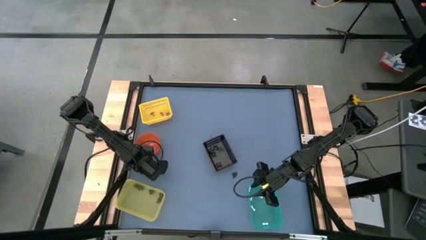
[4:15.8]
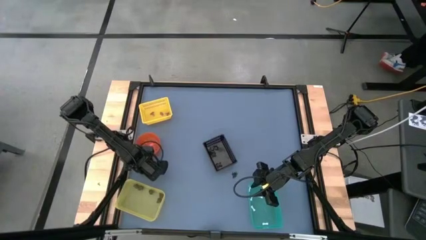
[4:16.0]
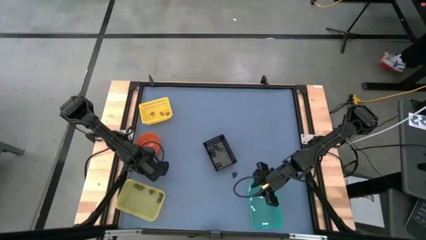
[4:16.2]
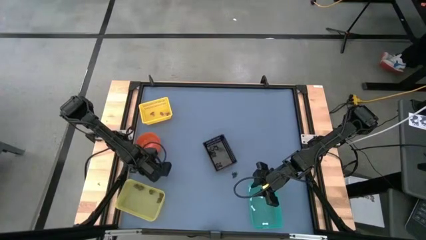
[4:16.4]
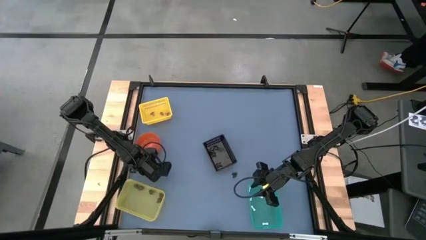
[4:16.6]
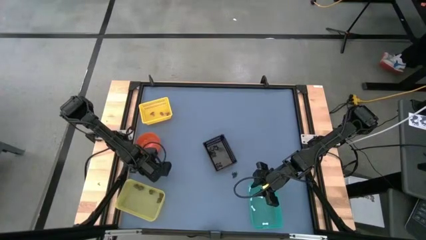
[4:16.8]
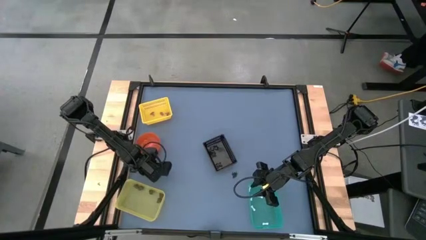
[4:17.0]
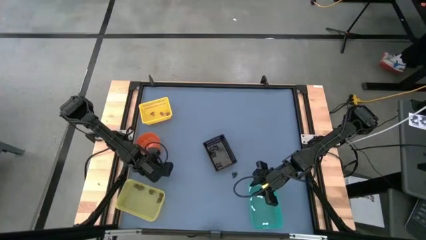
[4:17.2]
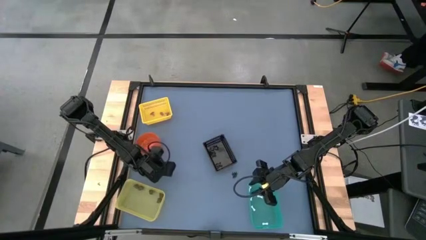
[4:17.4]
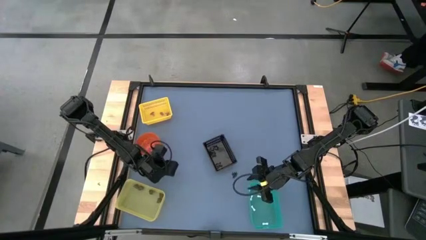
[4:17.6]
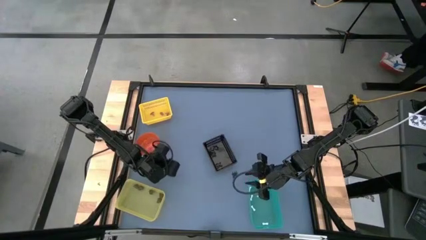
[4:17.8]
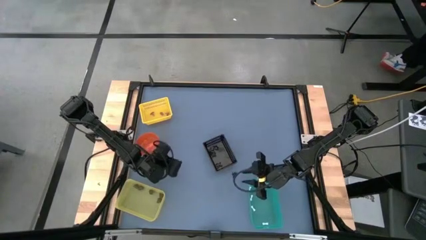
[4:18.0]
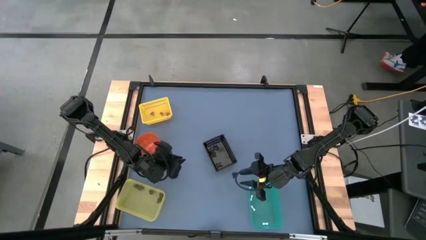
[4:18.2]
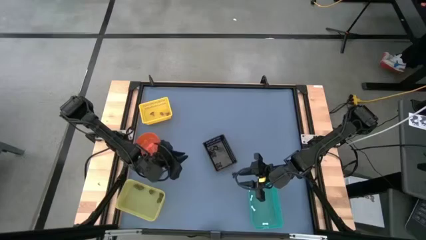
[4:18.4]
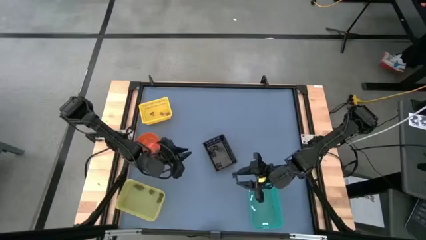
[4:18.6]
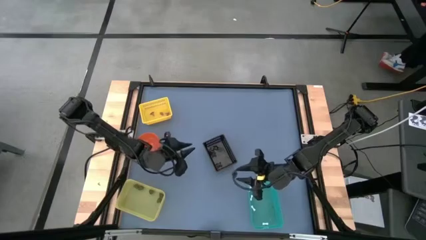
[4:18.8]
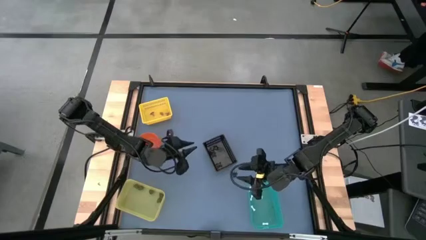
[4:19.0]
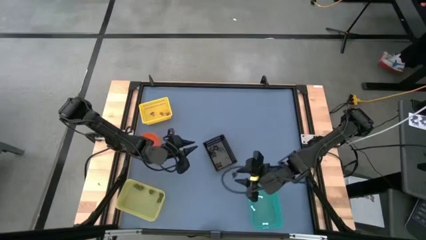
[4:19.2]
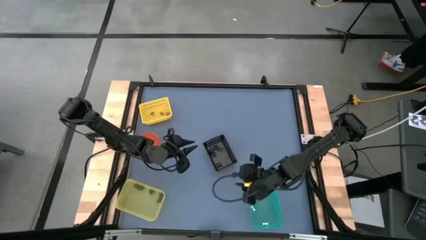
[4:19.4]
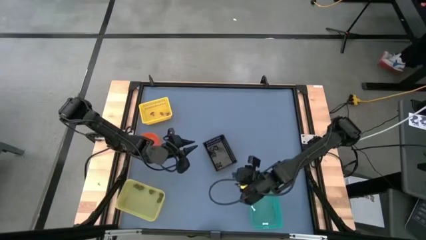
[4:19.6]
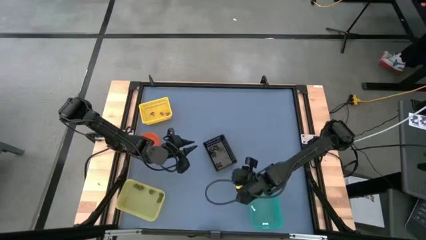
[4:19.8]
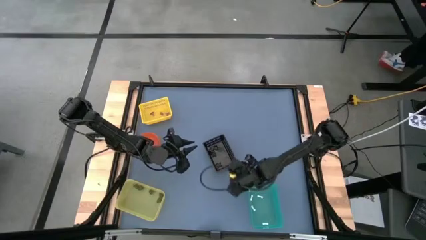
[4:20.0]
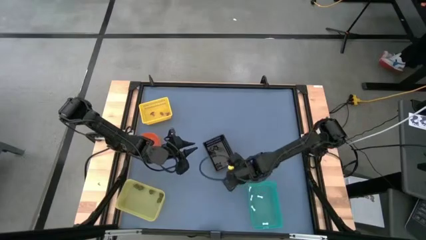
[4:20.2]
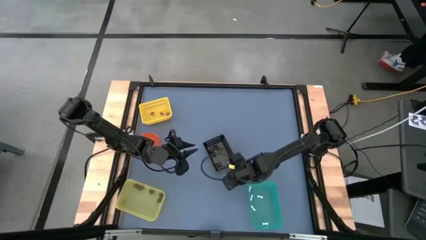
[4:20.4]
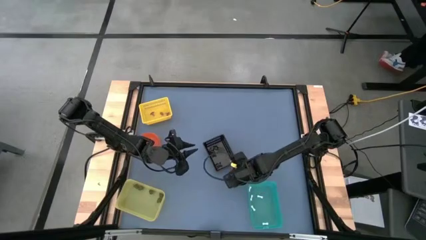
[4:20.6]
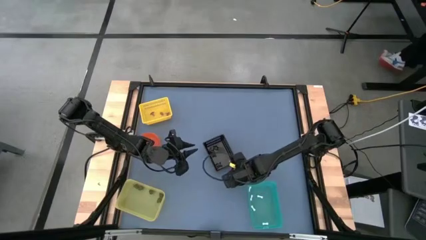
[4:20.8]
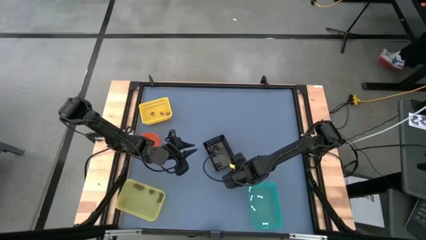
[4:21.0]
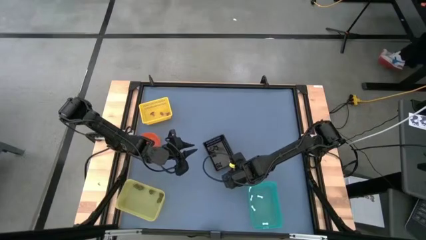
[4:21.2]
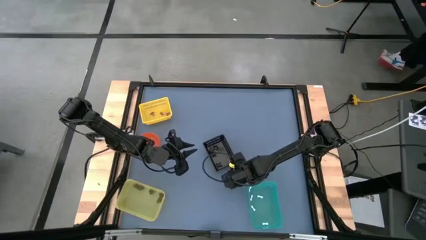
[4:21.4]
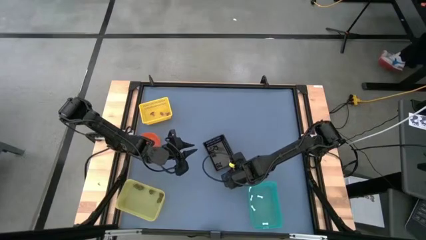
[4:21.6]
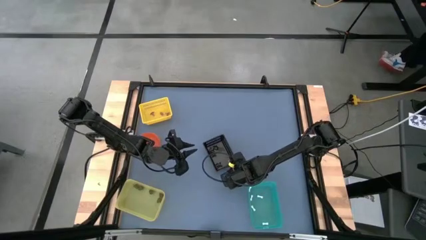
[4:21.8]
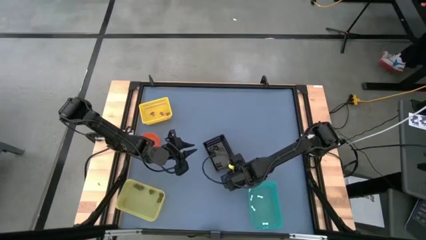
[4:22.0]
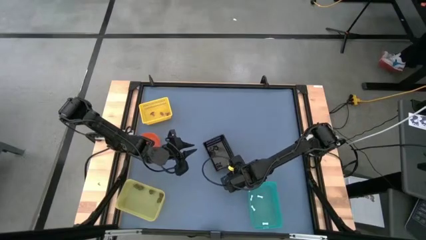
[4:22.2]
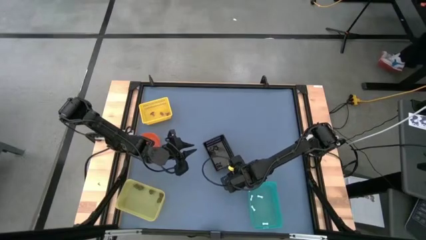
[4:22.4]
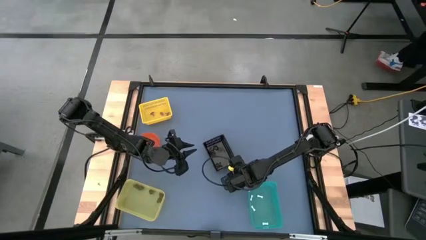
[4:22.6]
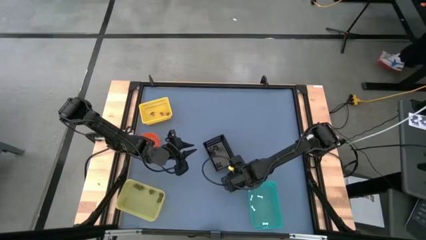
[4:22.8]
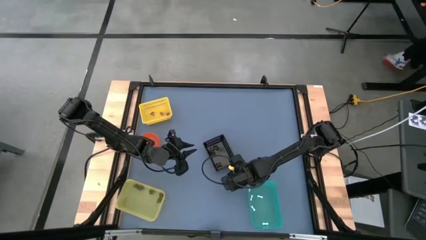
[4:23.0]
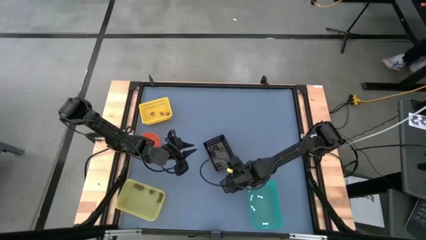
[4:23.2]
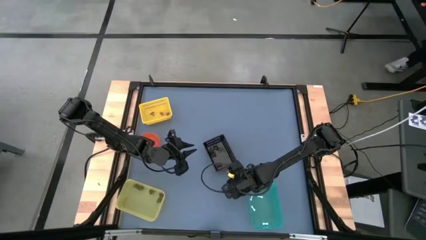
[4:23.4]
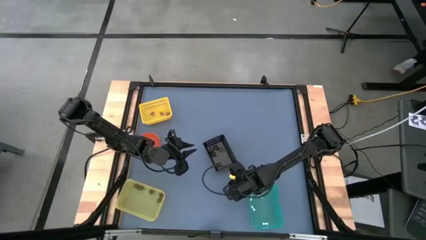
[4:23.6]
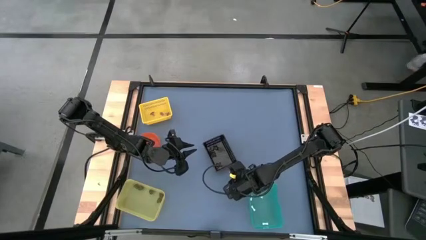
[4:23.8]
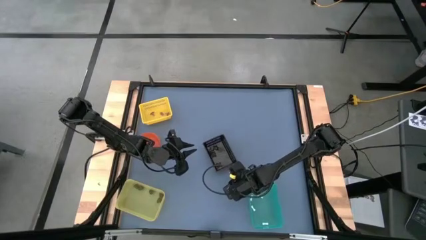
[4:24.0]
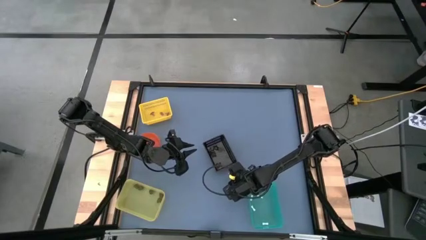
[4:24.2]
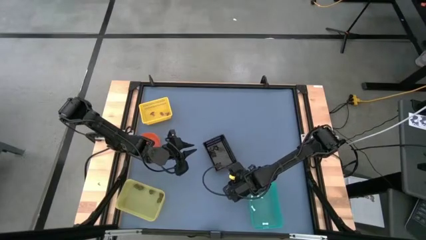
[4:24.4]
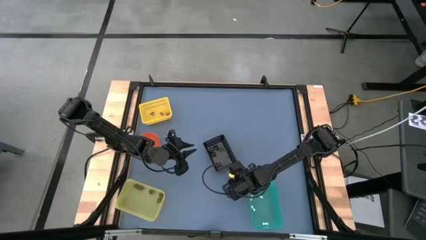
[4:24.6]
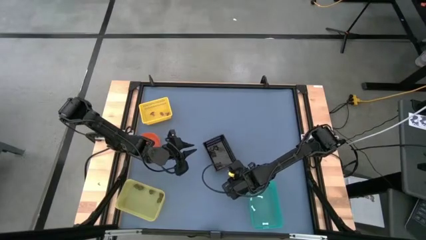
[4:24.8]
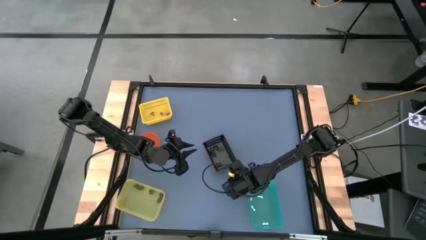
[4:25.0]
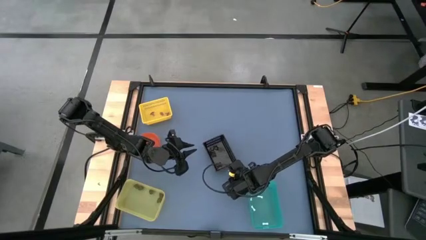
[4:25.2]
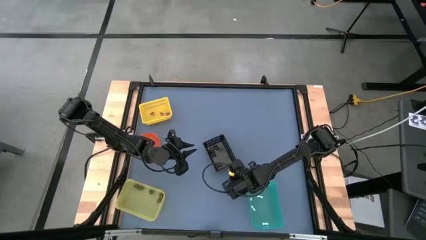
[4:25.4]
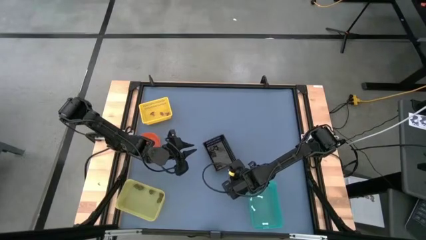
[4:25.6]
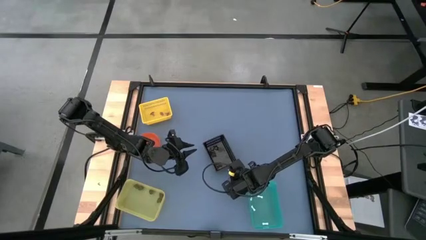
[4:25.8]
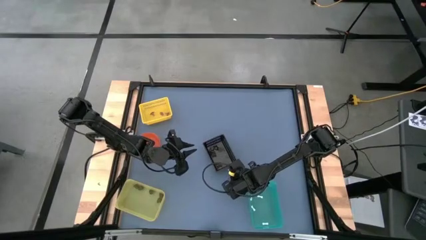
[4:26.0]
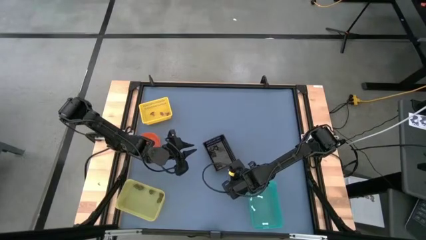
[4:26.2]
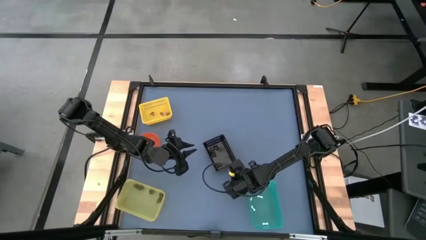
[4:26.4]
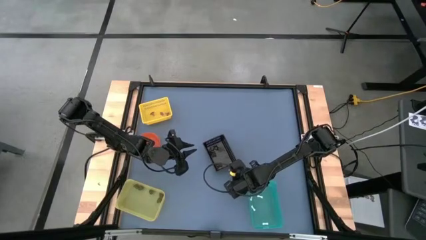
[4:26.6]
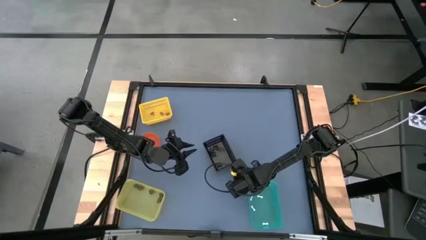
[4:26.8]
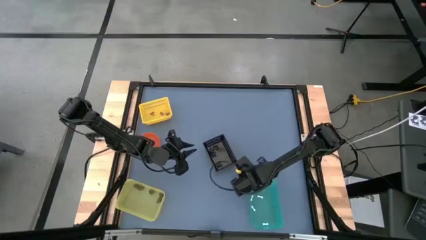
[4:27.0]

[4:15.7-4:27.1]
Task: Sort Halloween decoration
Put the black spider toy into the black bin

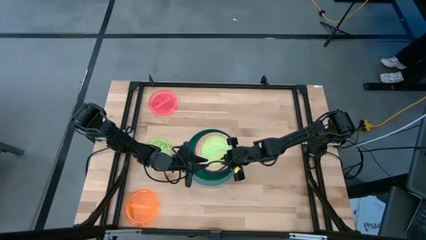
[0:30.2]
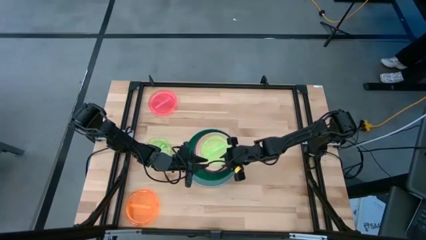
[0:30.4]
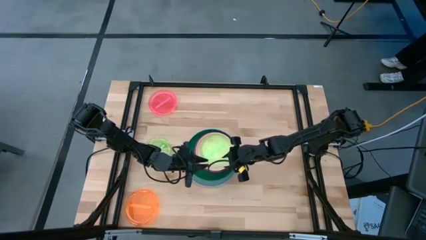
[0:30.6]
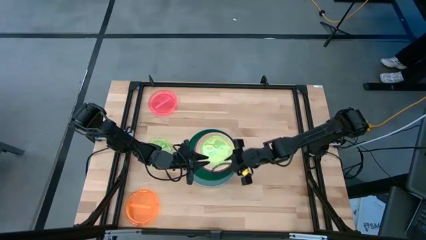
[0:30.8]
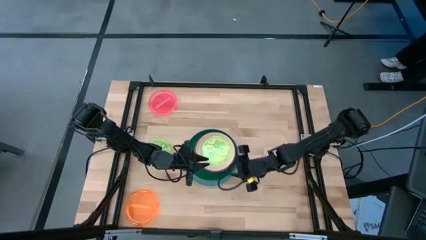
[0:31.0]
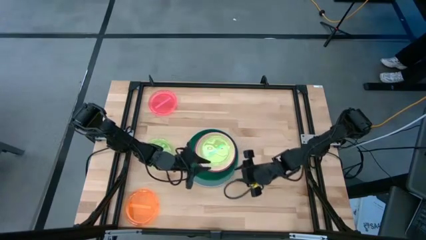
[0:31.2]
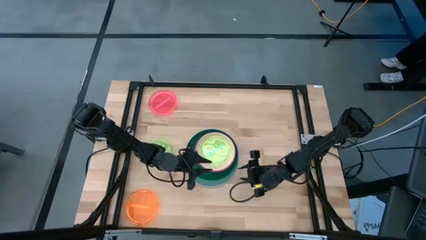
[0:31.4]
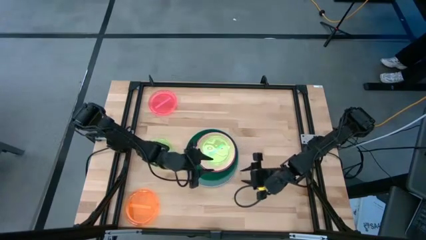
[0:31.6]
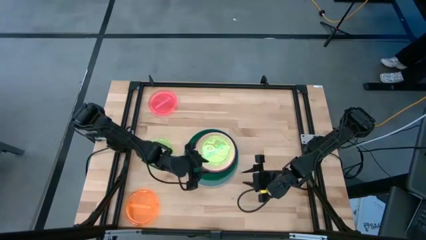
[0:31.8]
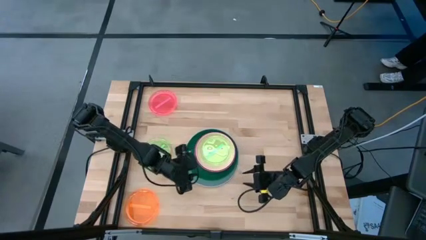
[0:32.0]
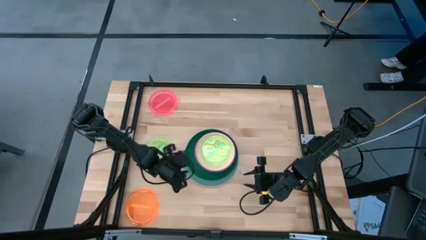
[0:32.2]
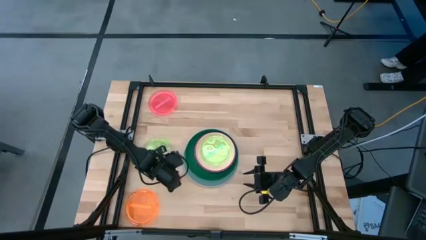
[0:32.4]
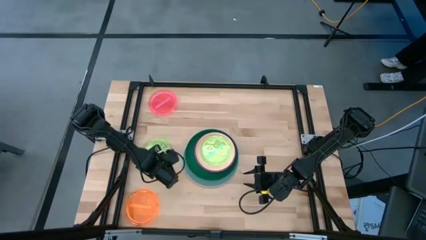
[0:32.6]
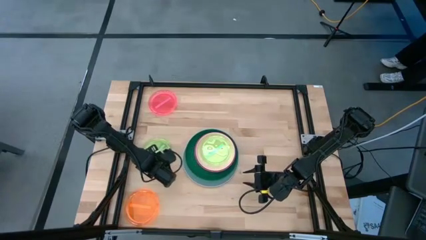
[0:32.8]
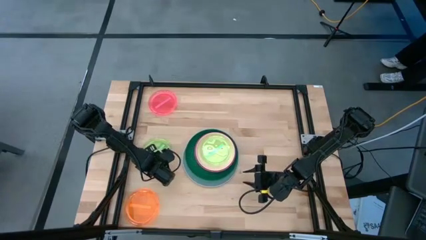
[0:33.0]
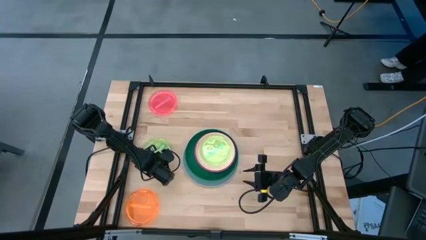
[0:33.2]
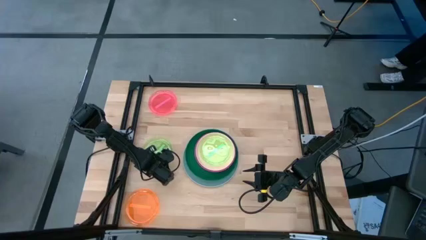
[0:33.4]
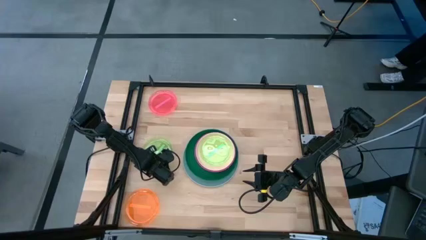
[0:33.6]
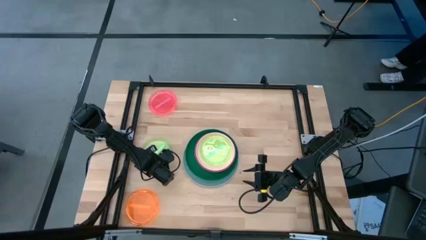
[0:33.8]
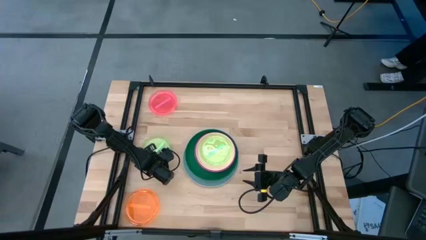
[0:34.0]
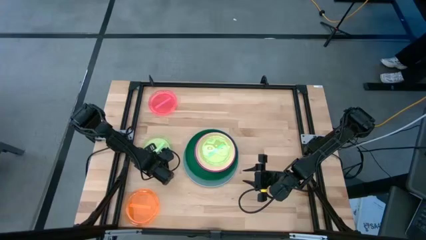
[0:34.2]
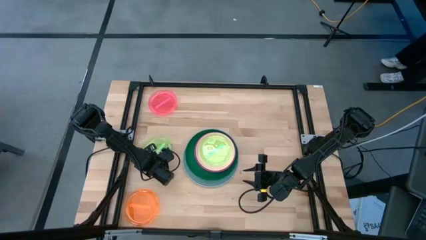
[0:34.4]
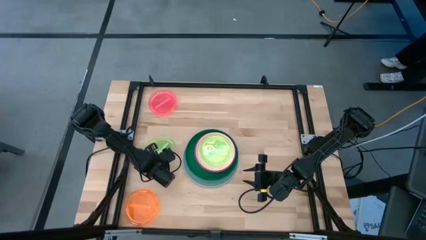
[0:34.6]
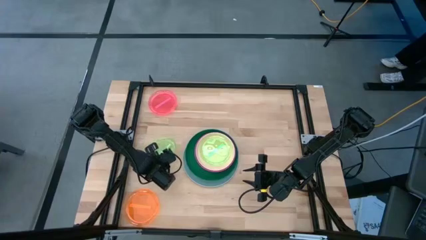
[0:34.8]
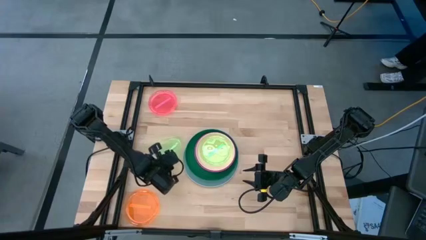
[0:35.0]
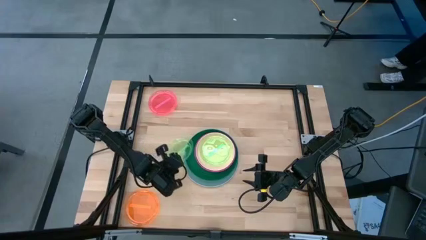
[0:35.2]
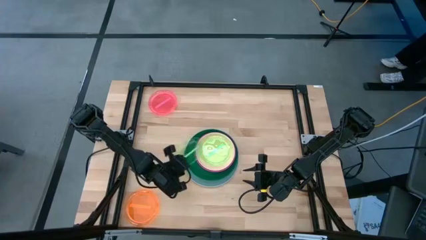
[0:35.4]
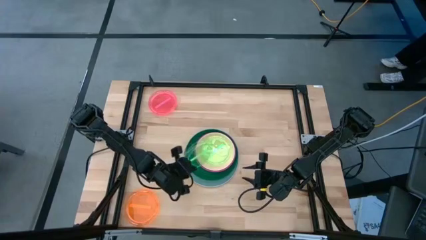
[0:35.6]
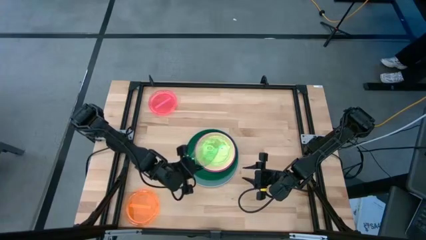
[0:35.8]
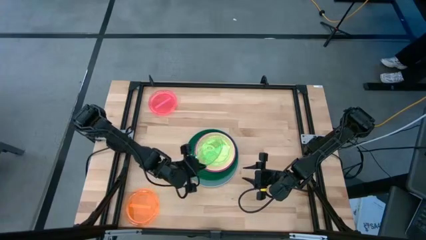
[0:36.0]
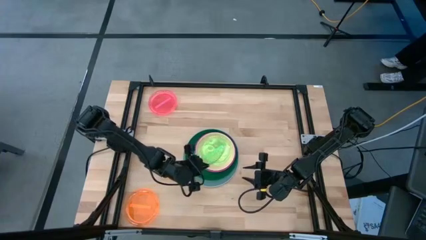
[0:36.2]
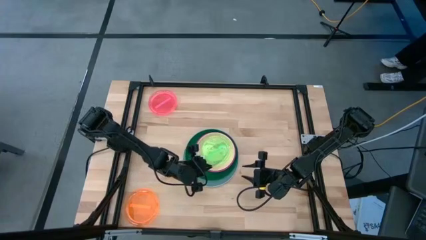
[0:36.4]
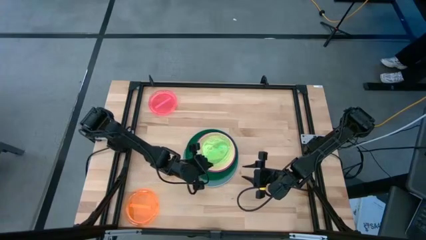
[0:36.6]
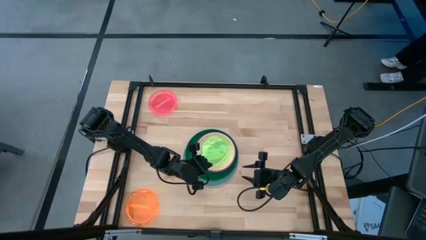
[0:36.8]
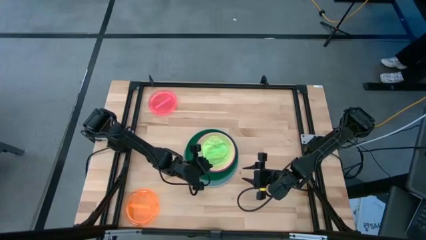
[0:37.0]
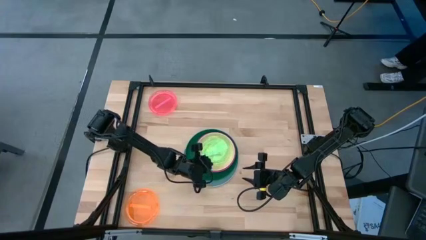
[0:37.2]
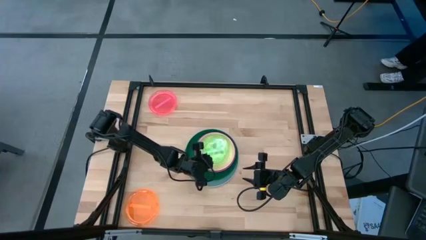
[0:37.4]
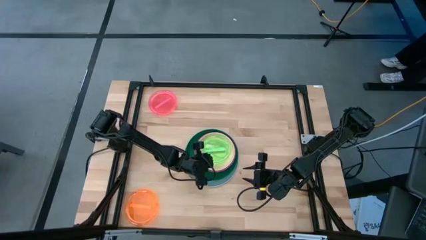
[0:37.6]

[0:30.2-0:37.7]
Task: Stack plastic plates
Stack the transparent green plate on top of the transparent green plate
